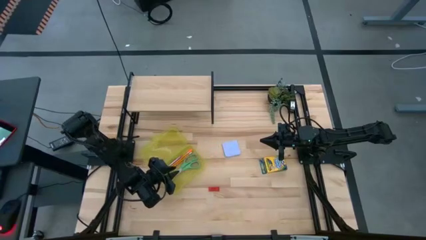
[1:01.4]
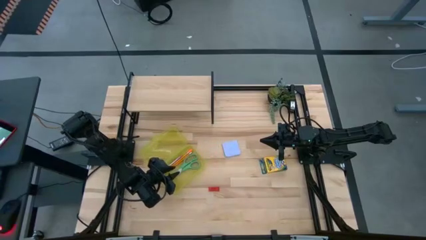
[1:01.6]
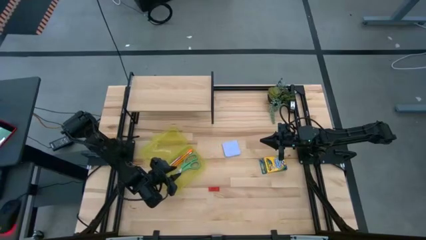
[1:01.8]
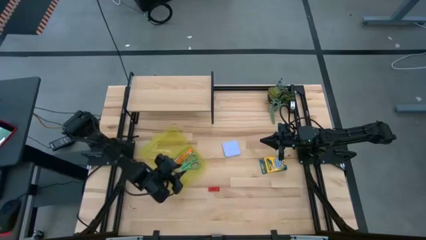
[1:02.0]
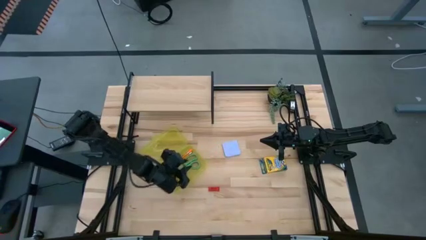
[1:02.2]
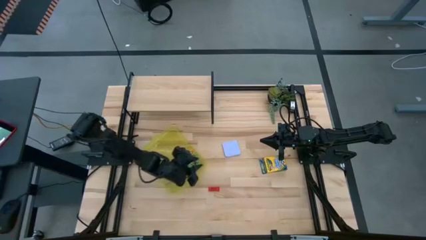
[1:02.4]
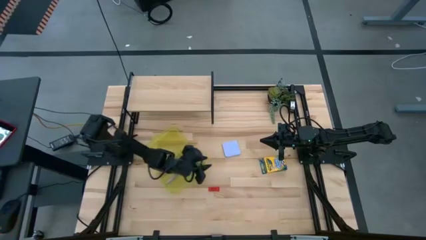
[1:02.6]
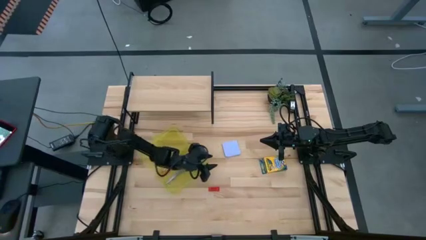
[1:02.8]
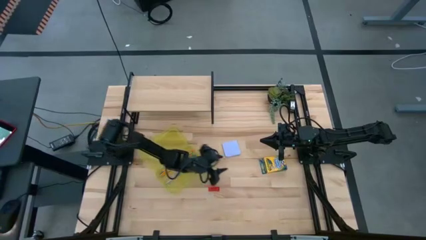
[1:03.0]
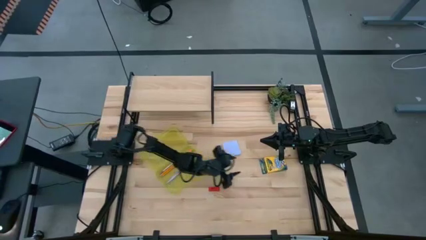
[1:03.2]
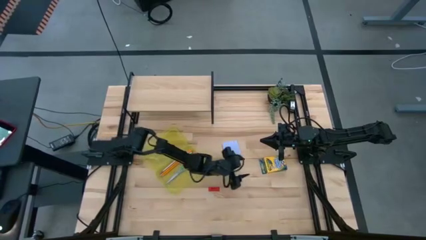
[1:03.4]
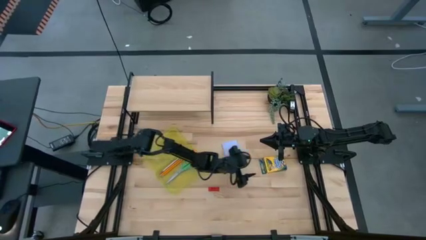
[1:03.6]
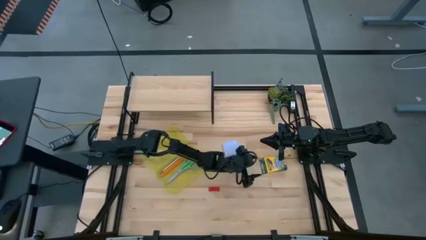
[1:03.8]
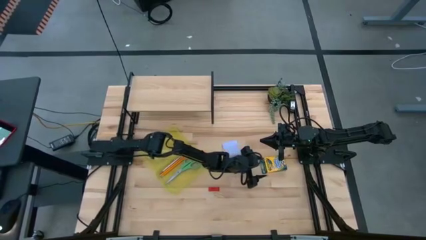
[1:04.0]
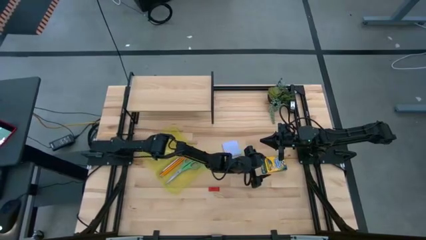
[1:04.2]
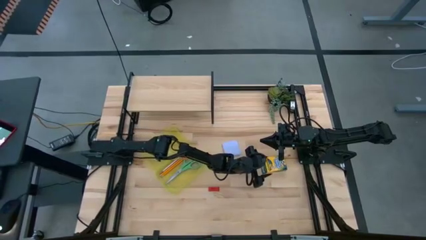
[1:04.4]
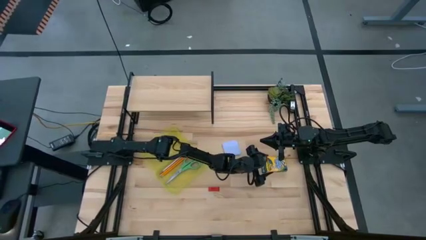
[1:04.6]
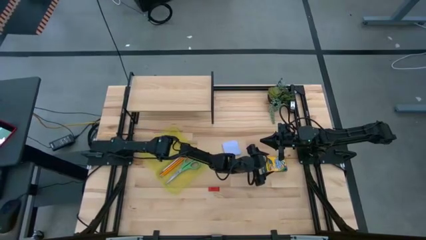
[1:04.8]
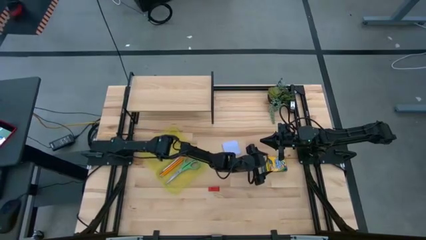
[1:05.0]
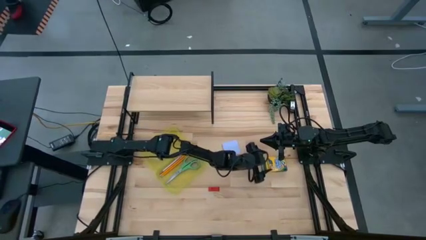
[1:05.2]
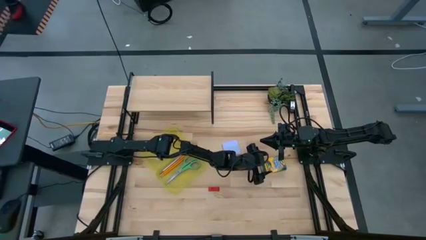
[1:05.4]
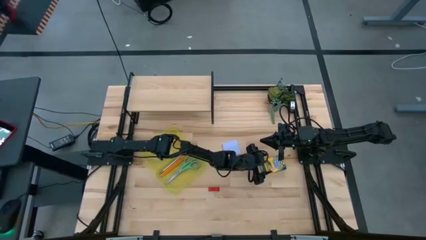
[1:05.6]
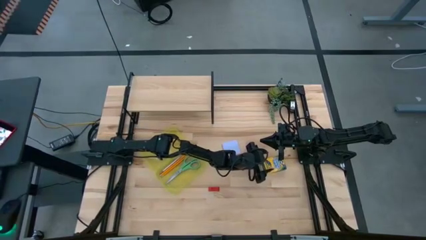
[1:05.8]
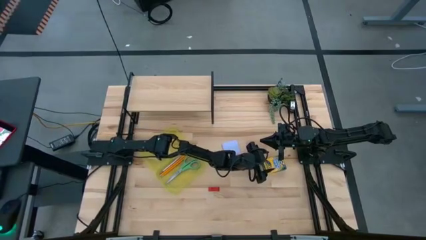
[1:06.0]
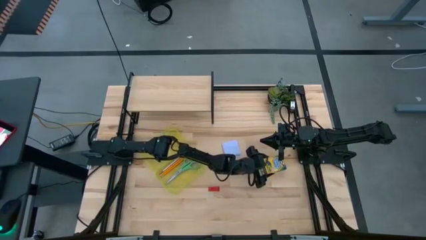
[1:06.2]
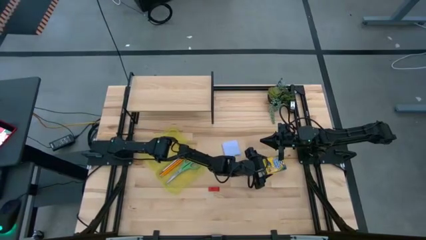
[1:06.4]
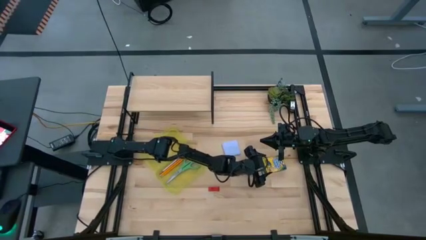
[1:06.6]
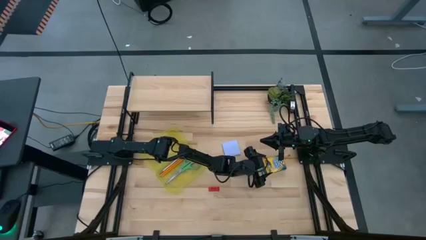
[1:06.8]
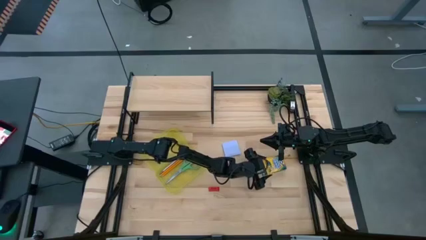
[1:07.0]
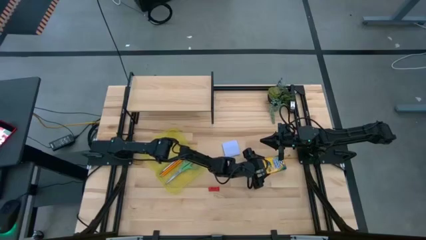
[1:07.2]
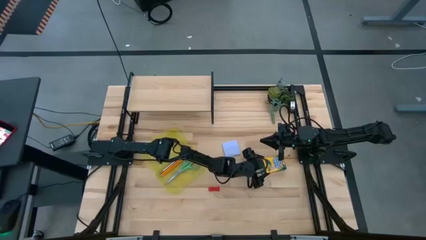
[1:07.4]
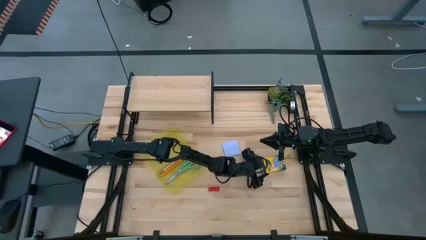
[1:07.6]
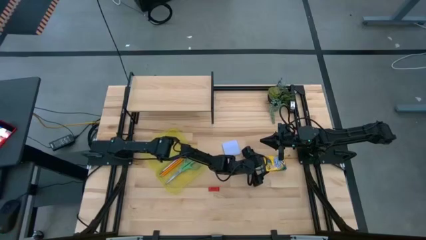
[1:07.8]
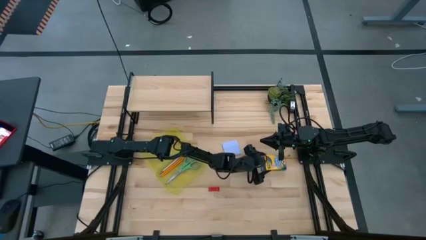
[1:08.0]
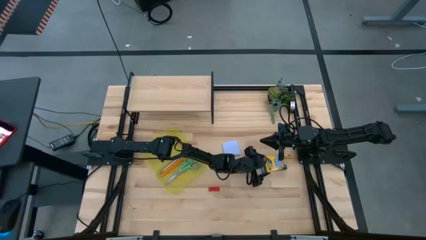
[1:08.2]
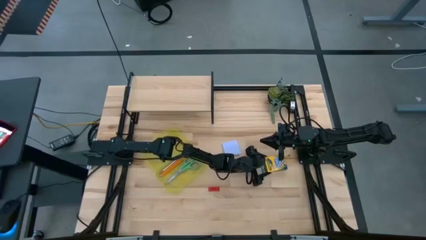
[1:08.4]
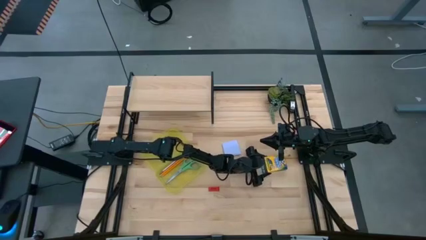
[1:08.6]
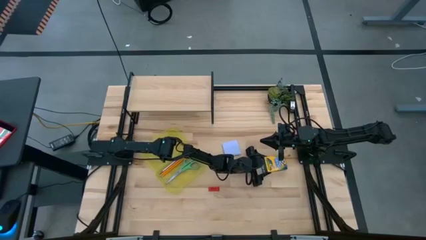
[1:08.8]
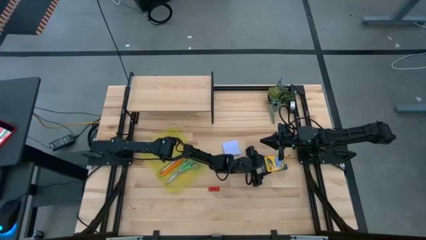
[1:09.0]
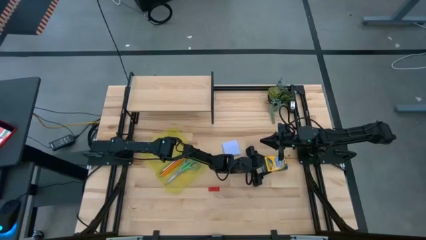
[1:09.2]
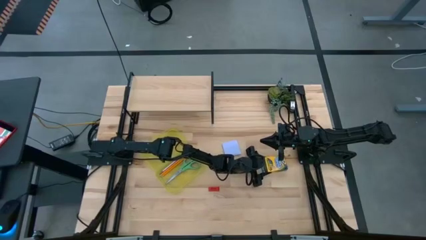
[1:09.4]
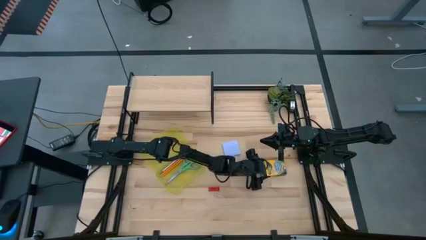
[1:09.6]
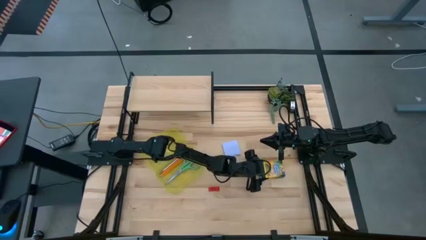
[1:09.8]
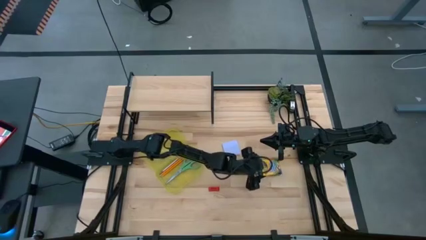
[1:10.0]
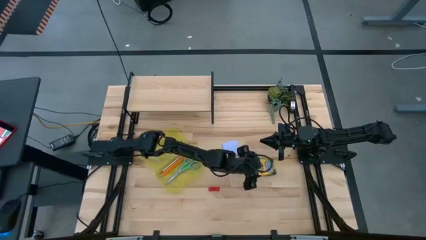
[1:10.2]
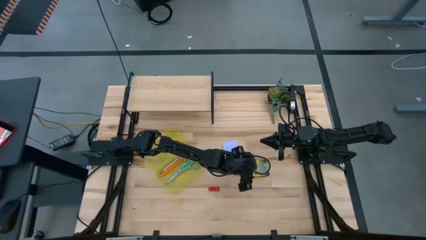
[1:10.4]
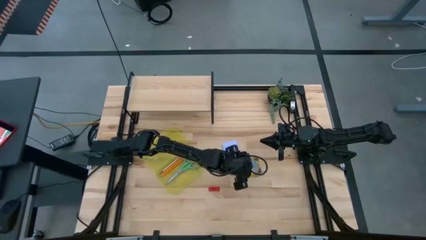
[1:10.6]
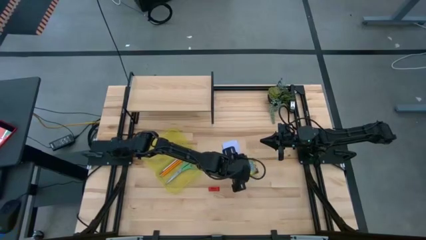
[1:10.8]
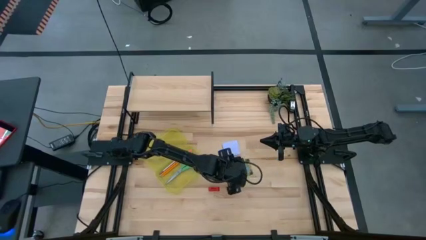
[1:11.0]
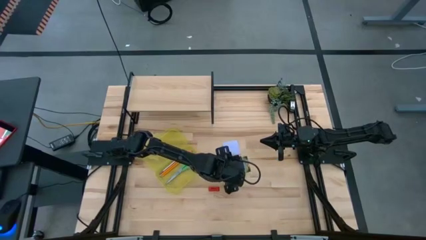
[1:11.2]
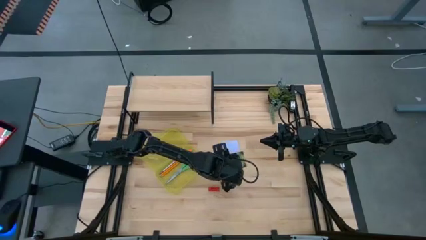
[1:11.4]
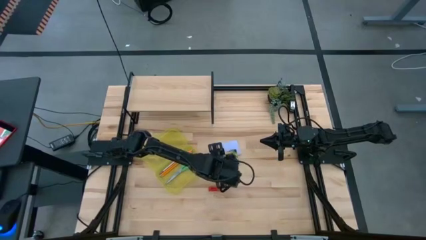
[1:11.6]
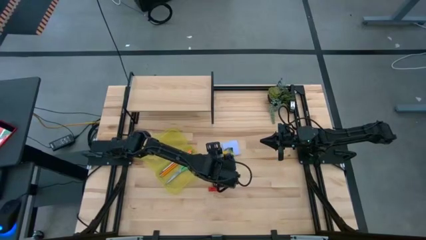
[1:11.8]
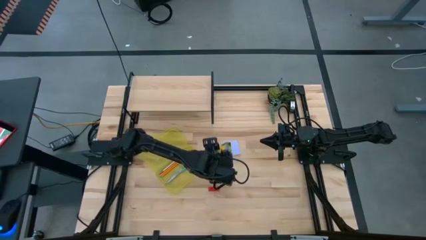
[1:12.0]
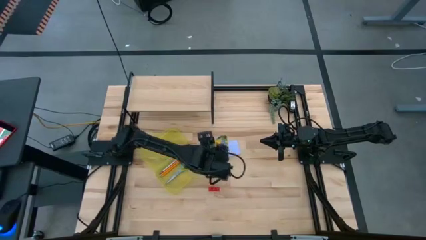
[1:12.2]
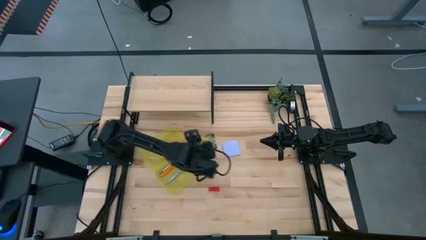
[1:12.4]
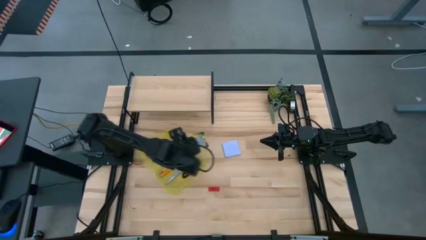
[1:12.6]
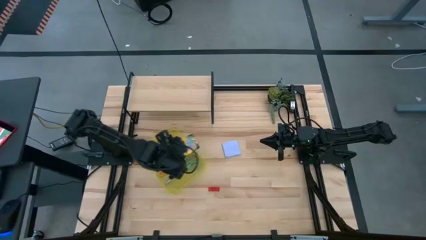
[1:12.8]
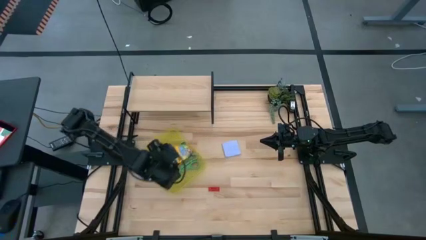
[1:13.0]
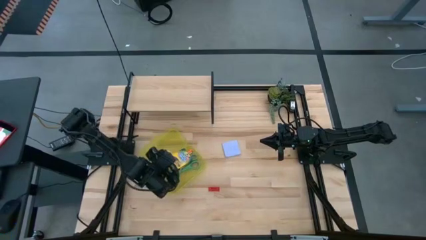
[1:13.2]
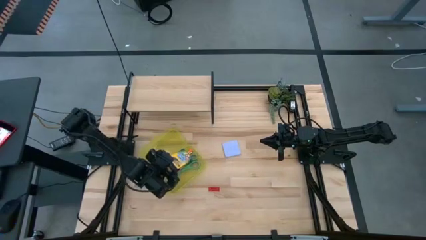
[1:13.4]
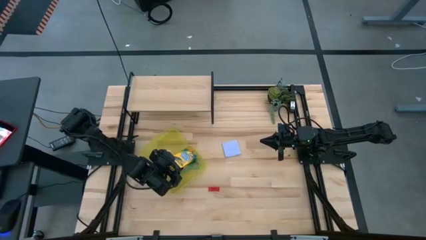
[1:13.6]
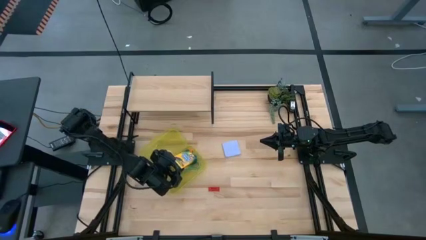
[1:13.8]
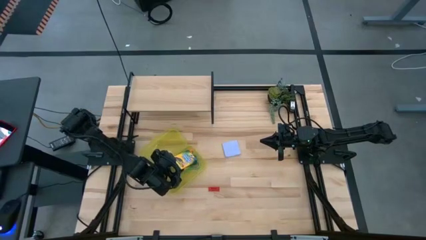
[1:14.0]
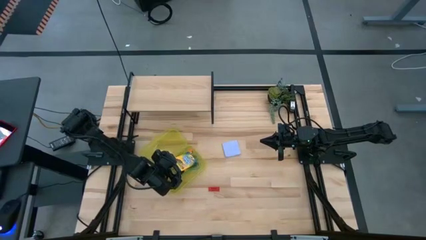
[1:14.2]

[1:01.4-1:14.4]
Task: Pack school essentials
Put the yellow crayon box into the yellow supply box

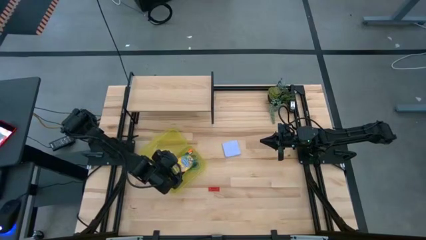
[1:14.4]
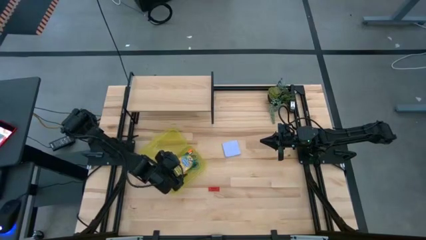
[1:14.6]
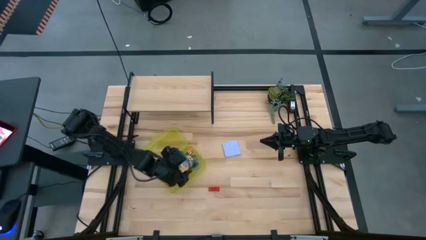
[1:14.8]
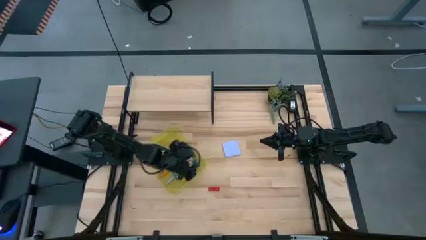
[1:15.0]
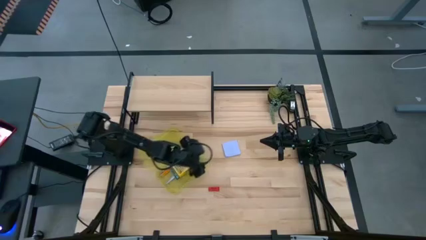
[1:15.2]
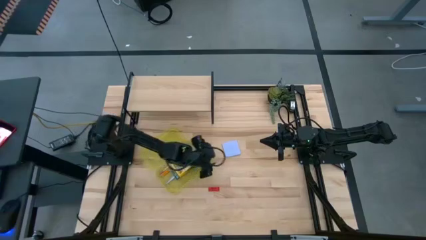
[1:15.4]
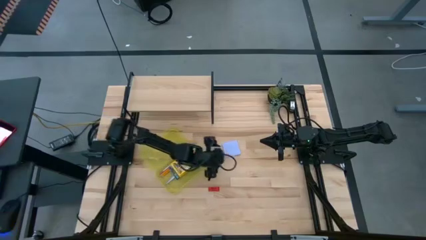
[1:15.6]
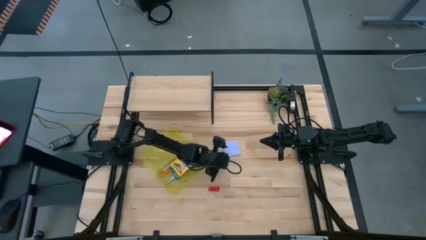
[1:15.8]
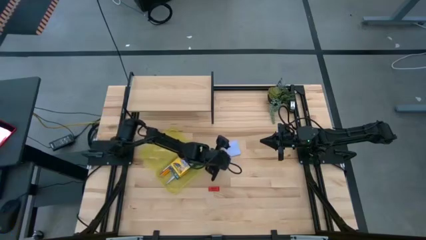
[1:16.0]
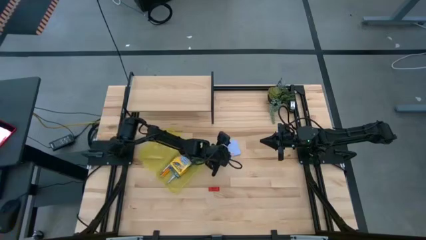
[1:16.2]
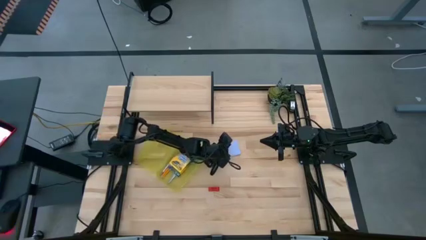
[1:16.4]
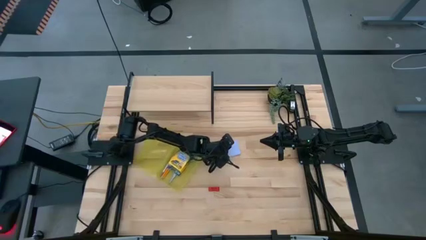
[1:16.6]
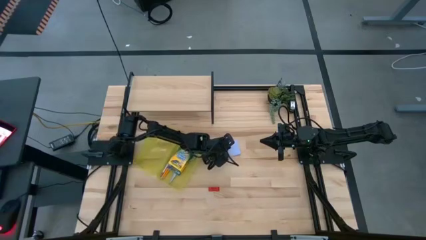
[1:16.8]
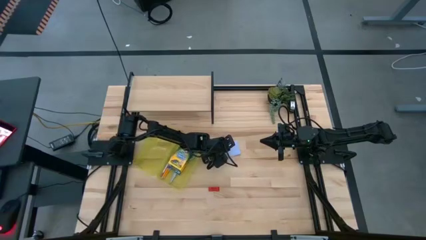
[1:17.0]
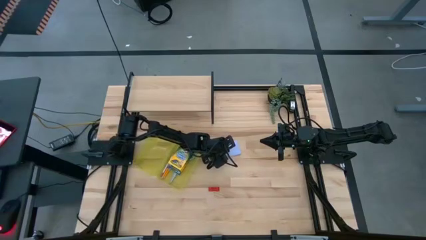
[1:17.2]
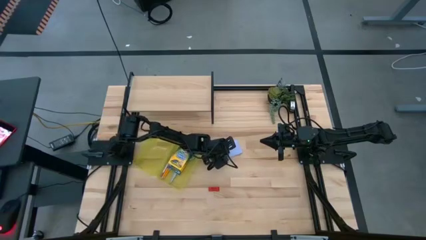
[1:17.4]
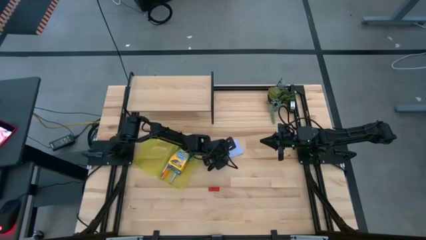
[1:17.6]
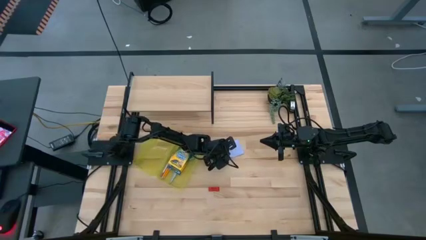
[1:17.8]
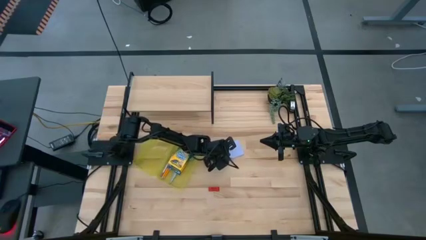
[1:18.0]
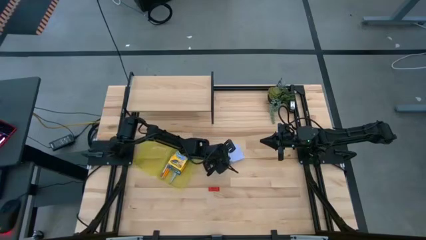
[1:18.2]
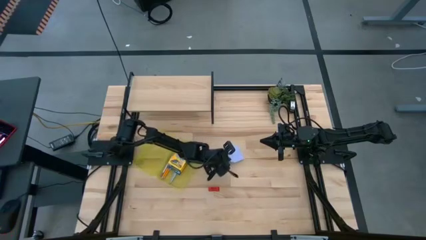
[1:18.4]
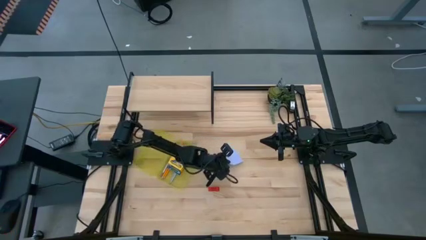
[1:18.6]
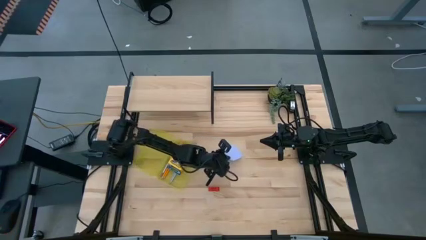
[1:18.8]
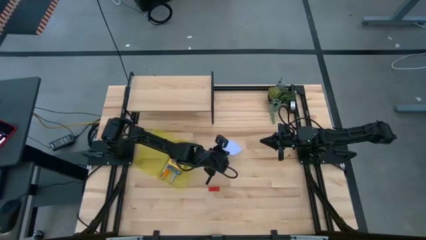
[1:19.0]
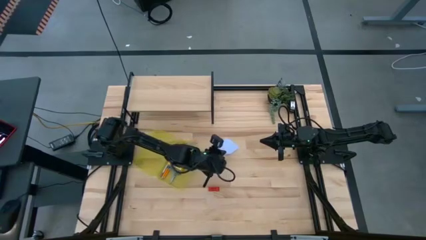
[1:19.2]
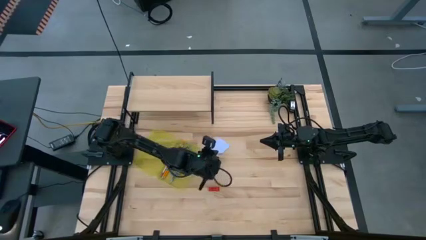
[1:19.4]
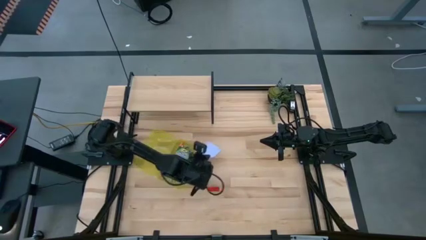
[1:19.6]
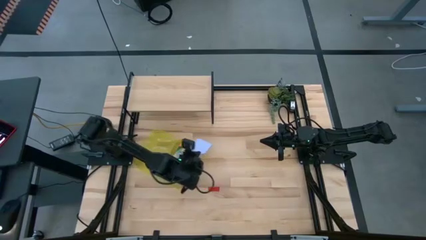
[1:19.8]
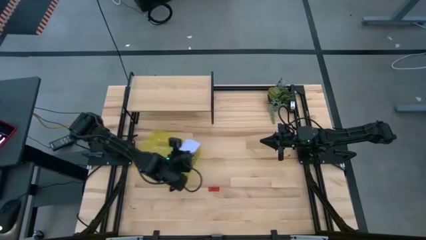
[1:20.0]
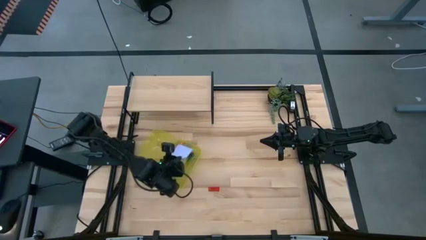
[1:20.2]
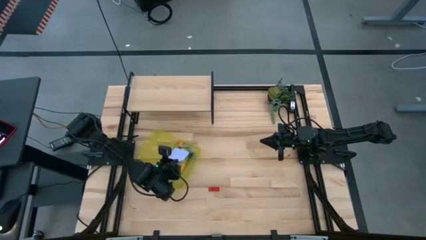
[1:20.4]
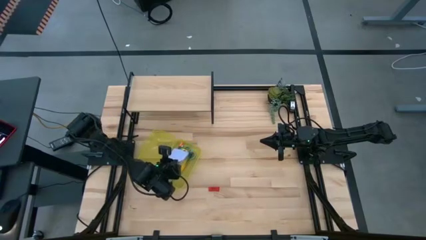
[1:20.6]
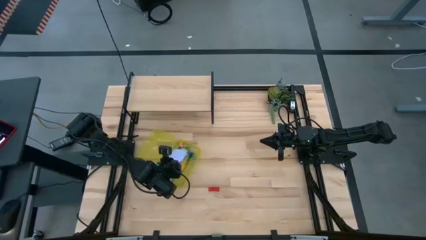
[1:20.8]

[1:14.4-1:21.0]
Put the purple sticky notes into the yellow supply box
